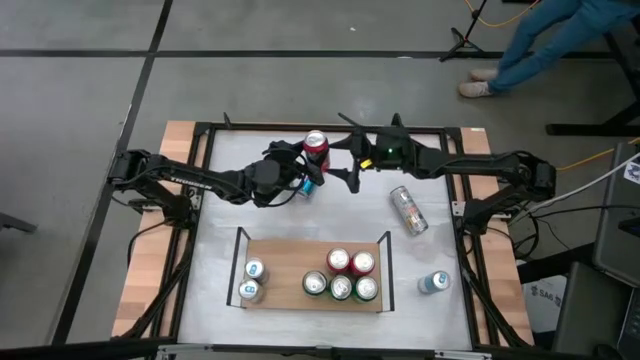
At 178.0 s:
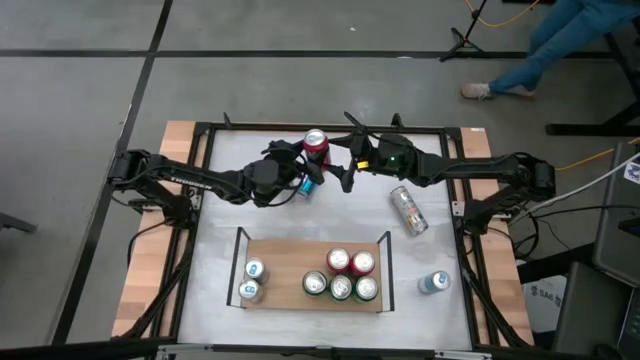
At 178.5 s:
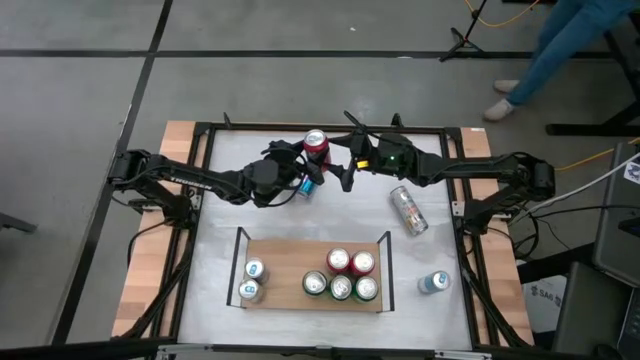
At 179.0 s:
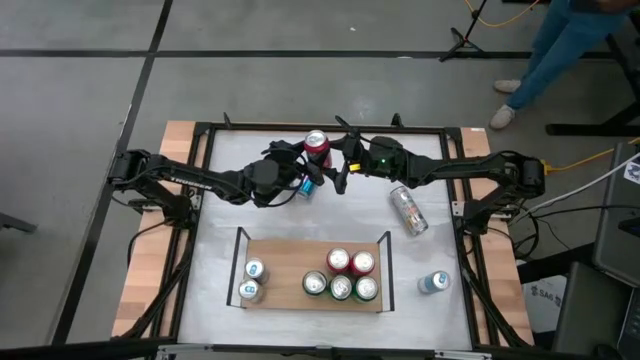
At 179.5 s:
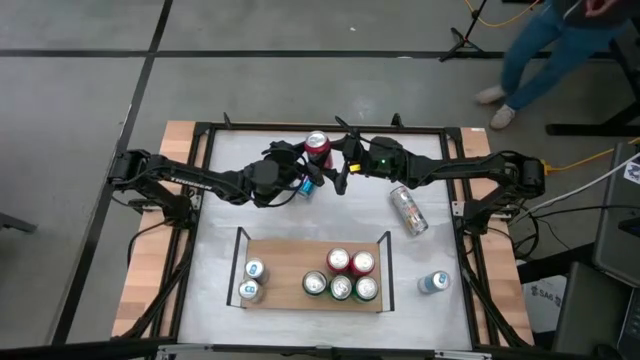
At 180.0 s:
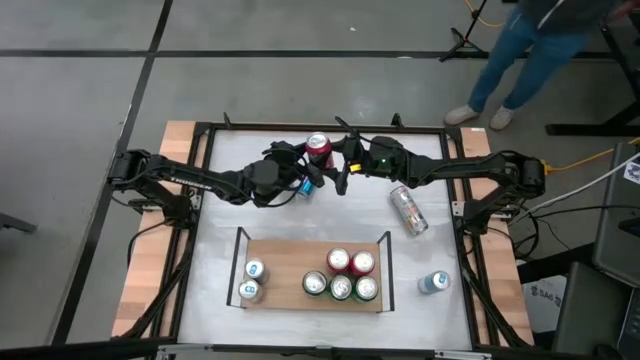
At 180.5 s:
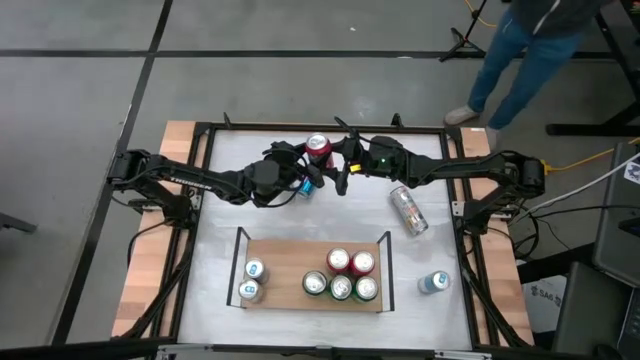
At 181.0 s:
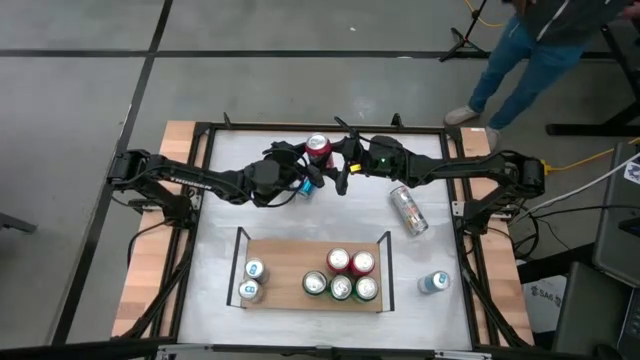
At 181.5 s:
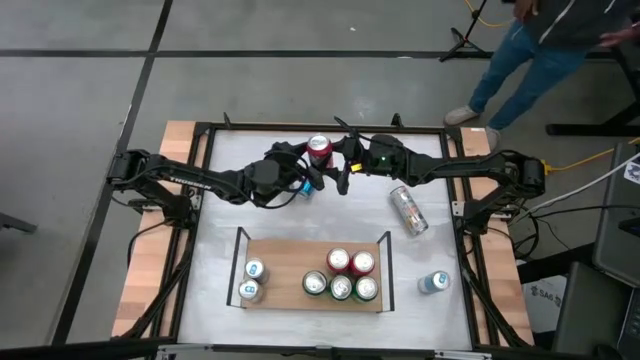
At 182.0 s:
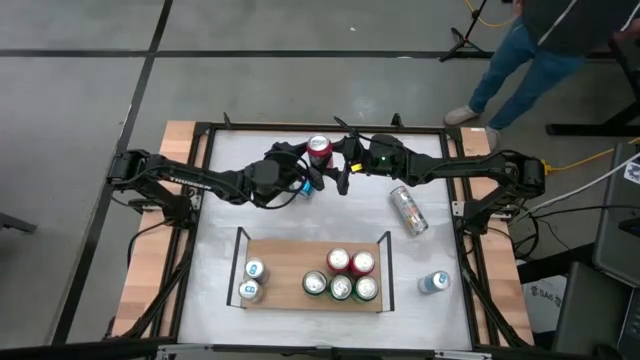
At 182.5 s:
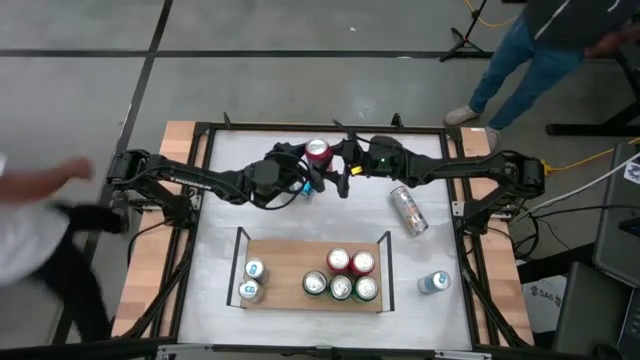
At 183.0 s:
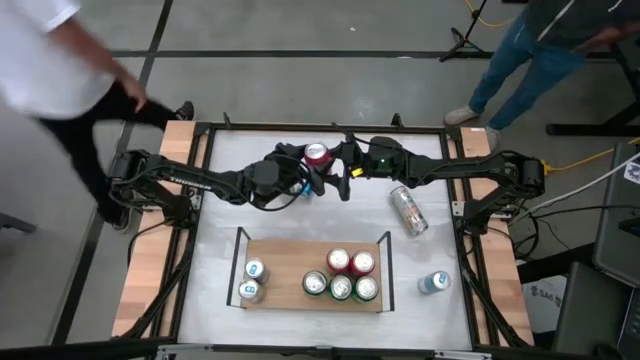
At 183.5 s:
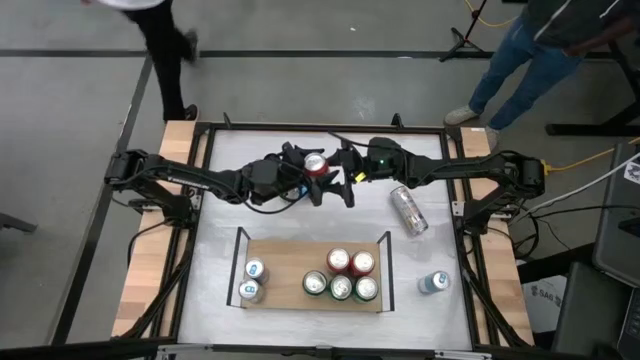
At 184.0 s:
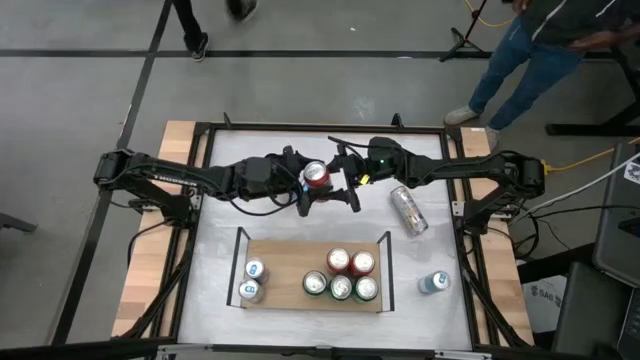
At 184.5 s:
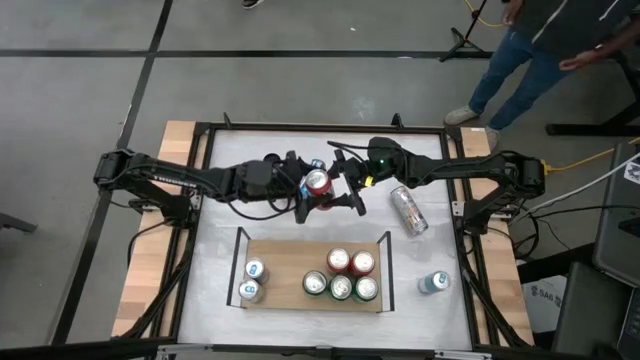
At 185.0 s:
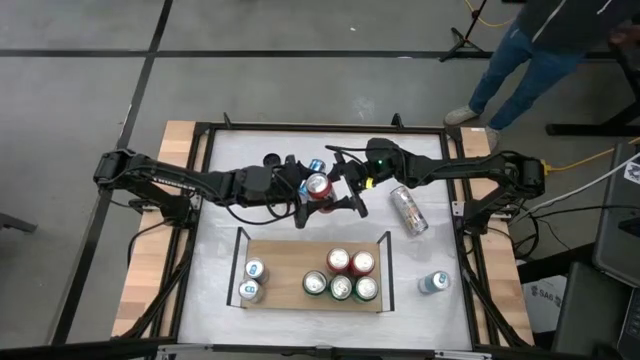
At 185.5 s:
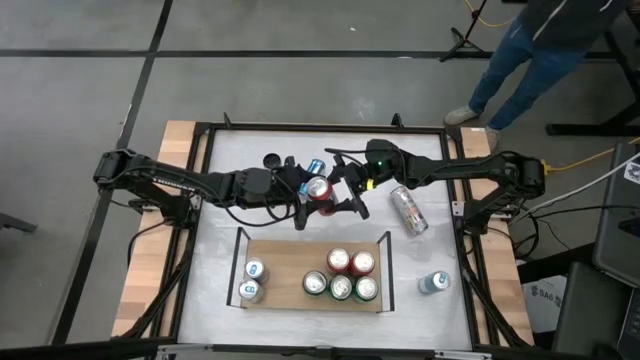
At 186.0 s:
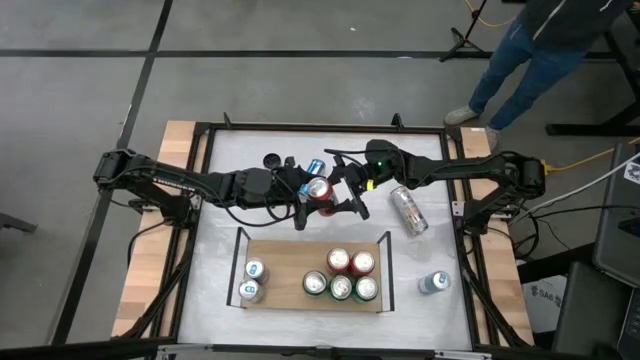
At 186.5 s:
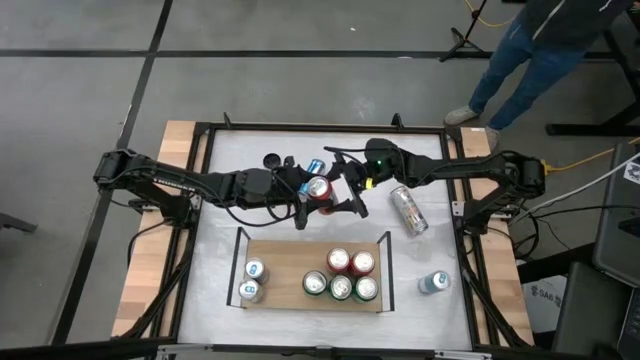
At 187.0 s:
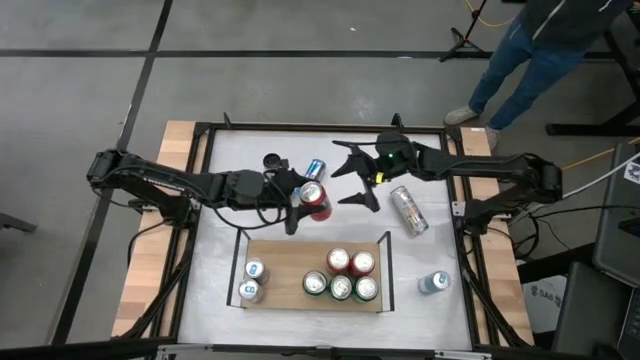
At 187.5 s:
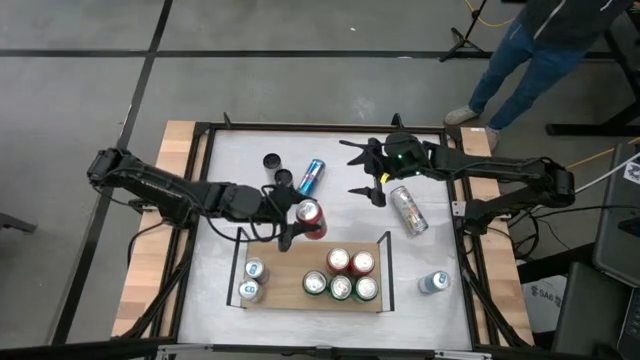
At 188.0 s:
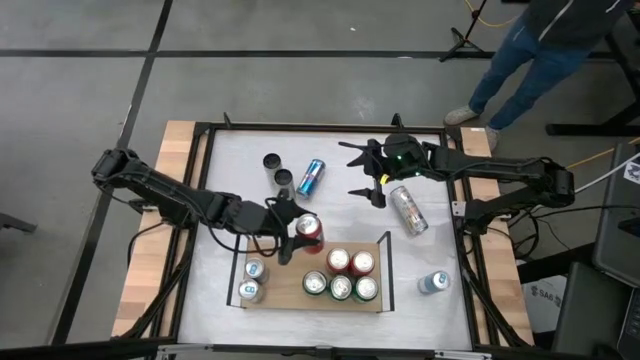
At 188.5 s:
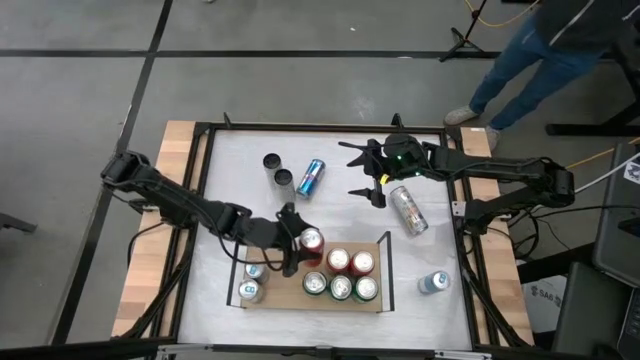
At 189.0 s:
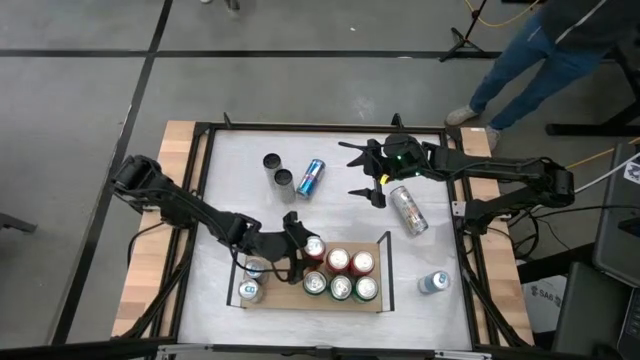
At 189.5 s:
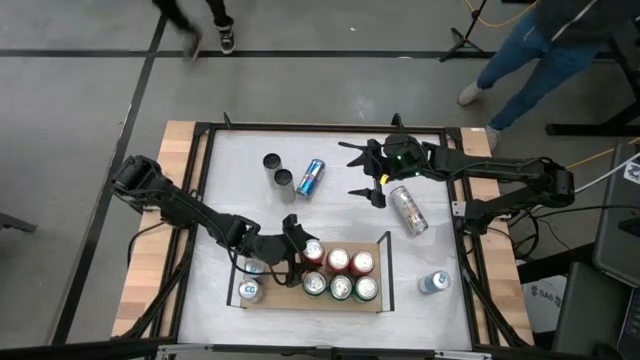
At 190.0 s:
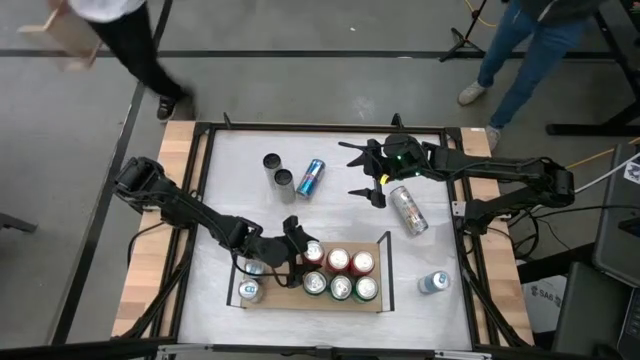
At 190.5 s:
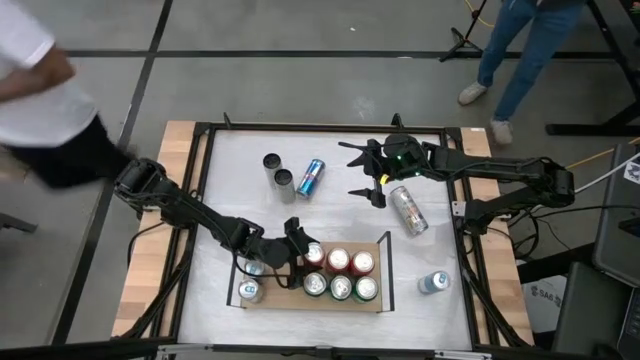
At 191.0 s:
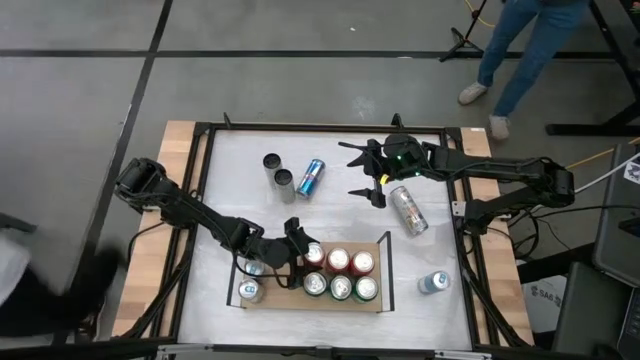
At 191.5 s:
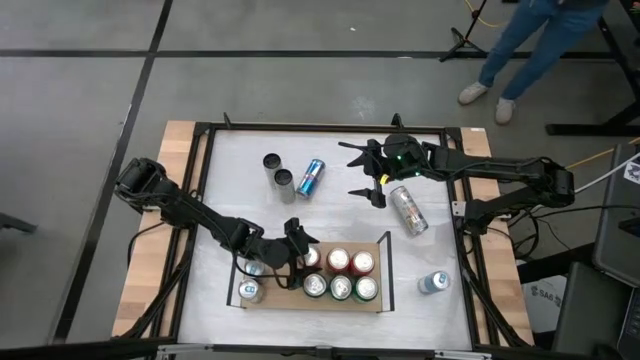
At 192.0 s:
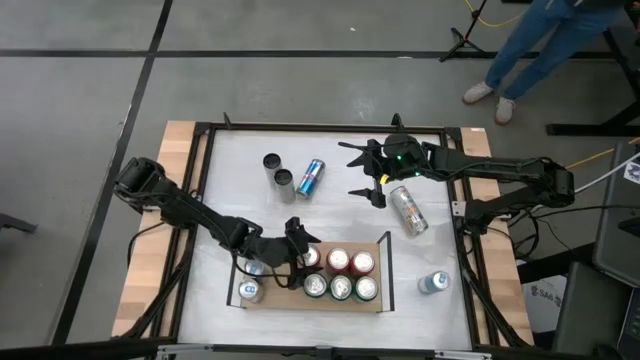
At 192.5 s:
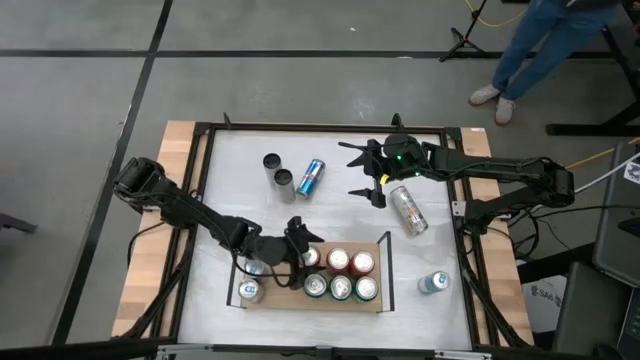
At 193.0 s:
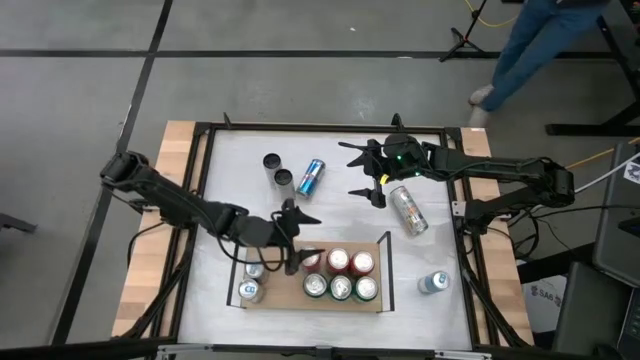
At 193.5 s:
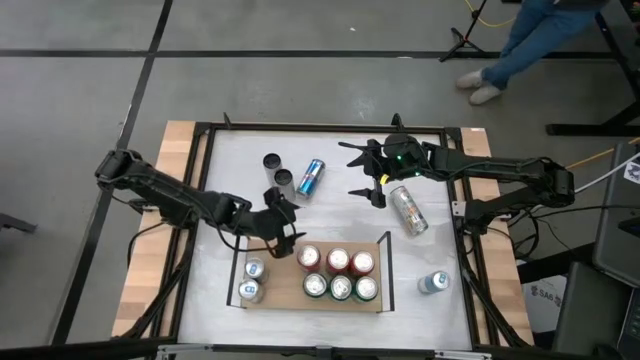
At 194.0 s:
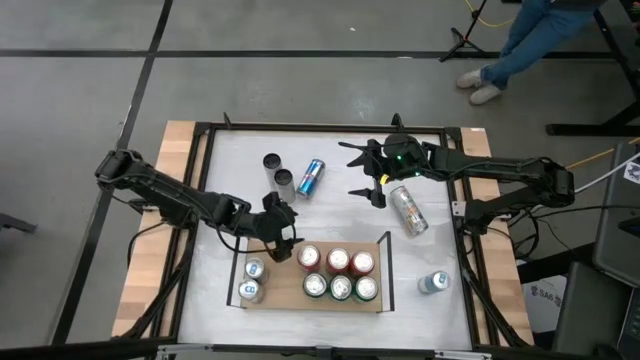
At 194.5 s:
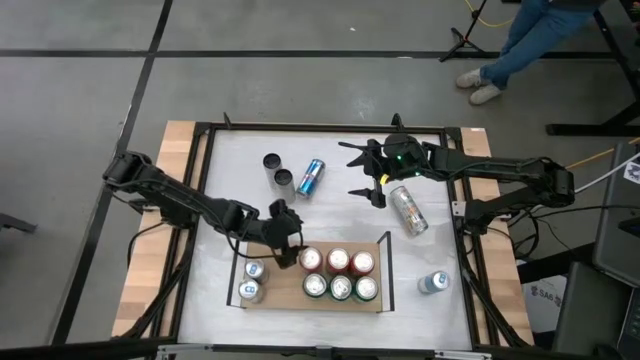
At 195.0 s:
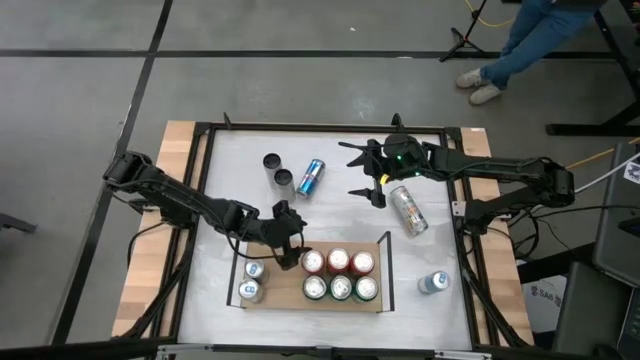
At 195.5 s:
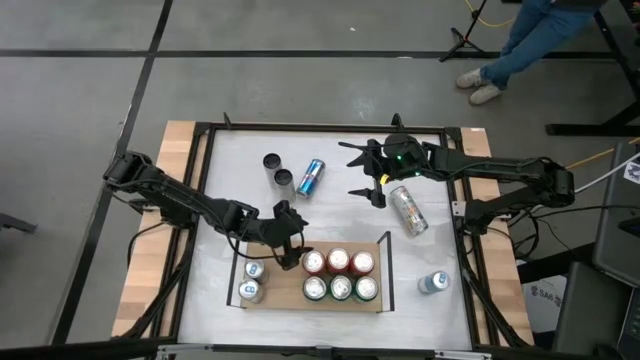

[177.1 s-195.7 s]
Task: Place canned beverage on shelf
Put the red soda can on the shelf aligned with the other red soda can

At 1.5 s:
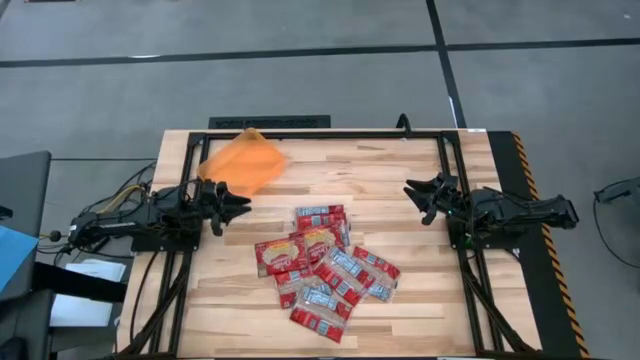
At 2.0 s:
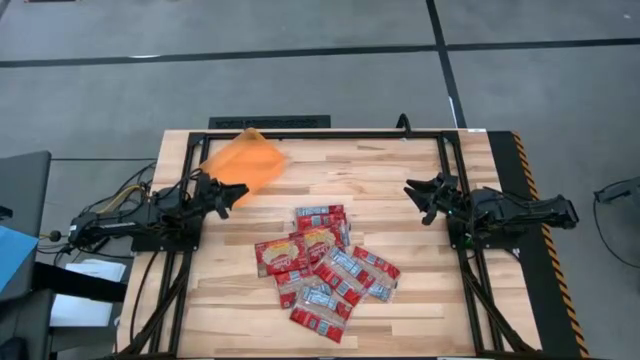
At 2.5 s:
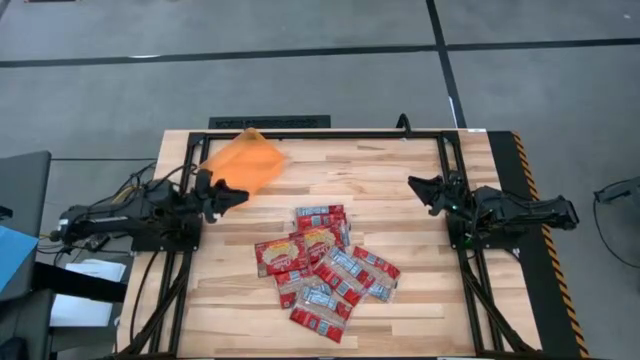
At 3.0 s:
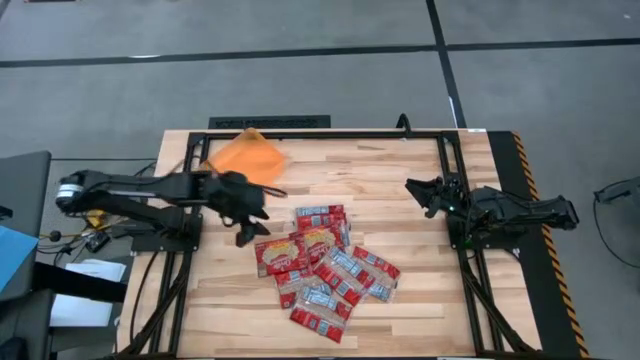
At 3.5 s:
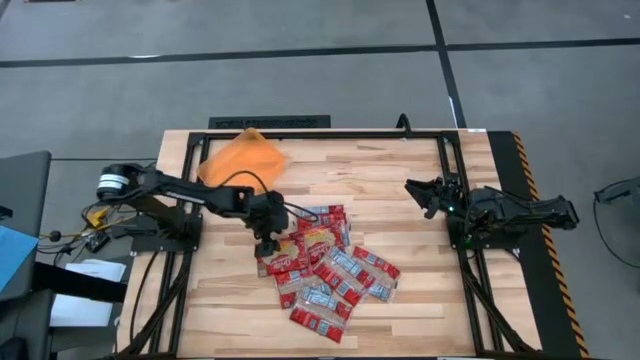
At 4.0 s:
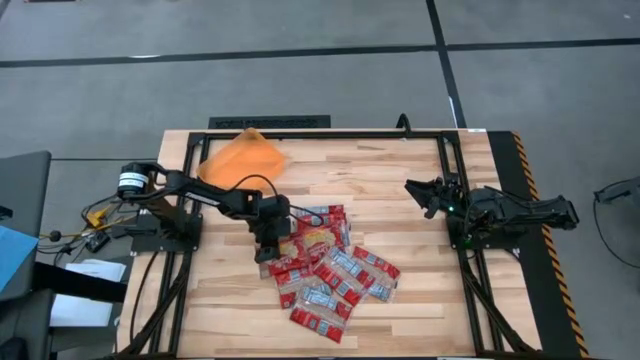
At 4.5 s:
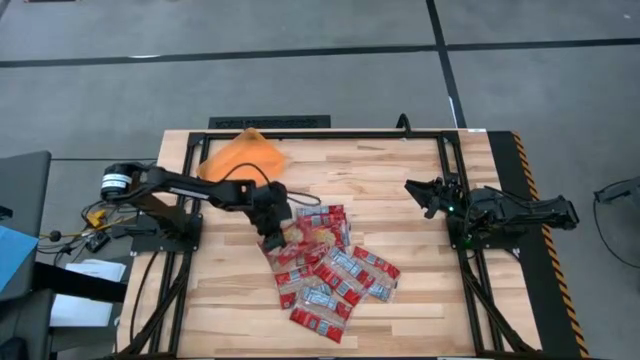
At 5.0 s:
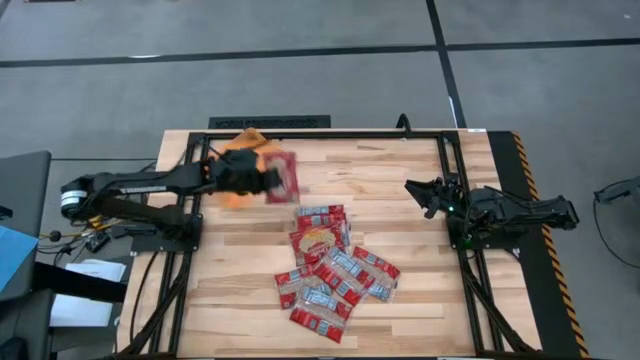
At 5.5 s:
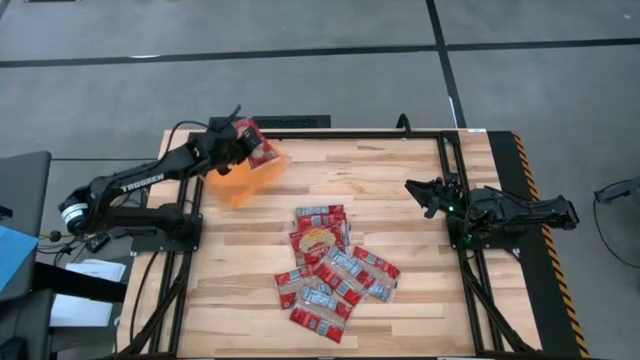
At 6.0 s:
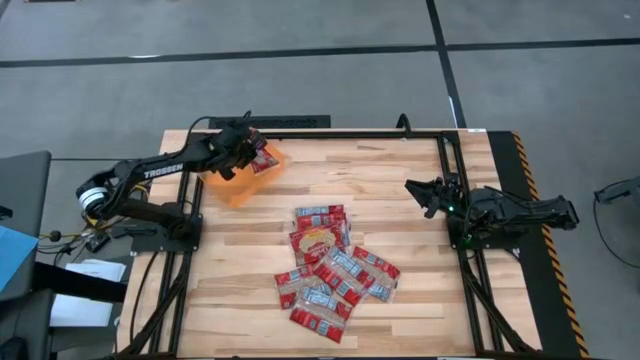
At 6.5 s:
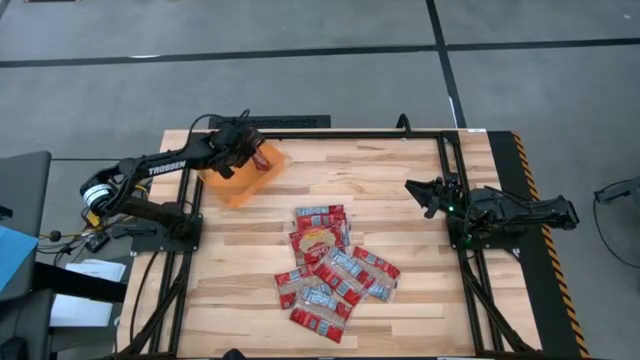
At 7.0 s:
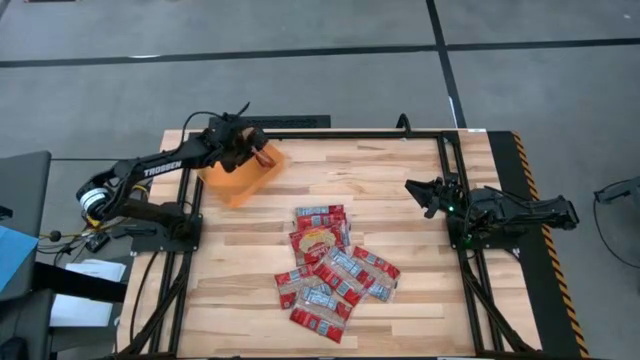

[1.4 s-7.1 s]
Task: Sort popcorn bags into baskets
Put the red popcorn pack into the orange bin
